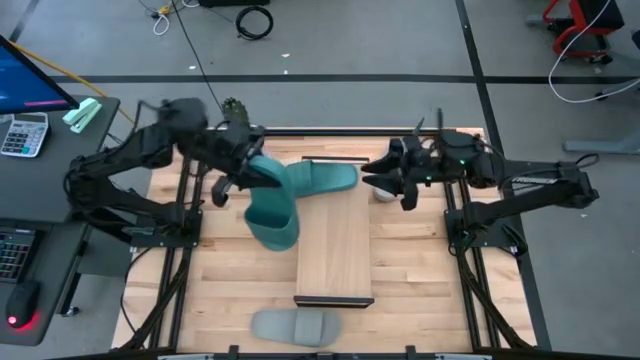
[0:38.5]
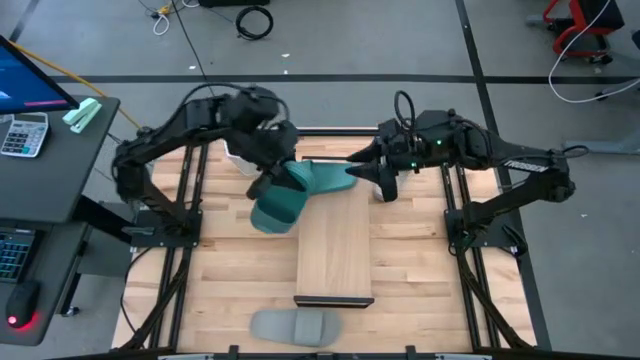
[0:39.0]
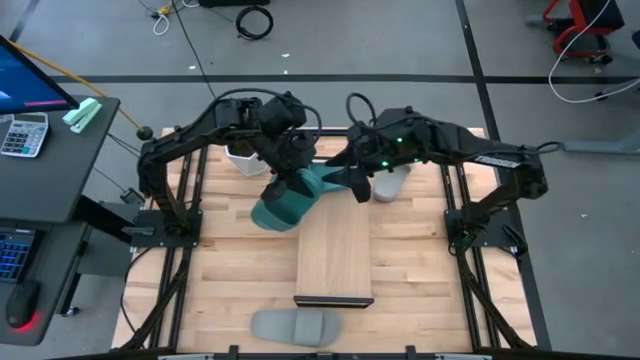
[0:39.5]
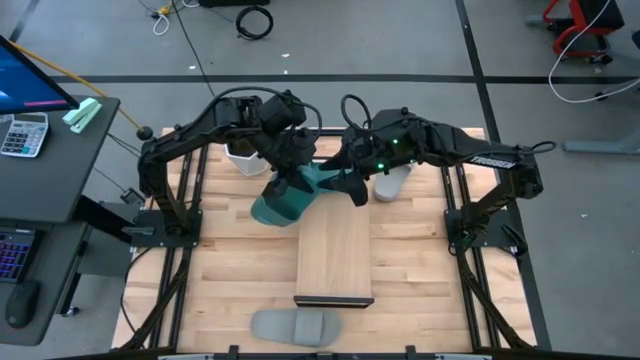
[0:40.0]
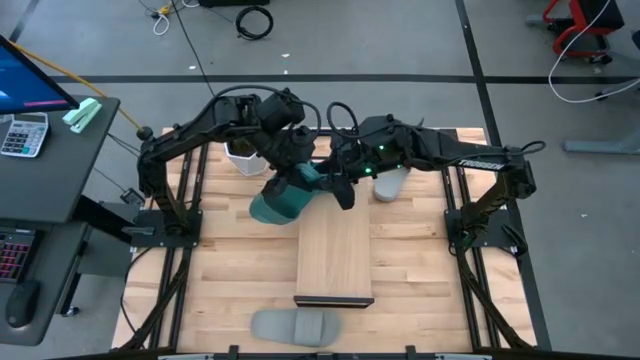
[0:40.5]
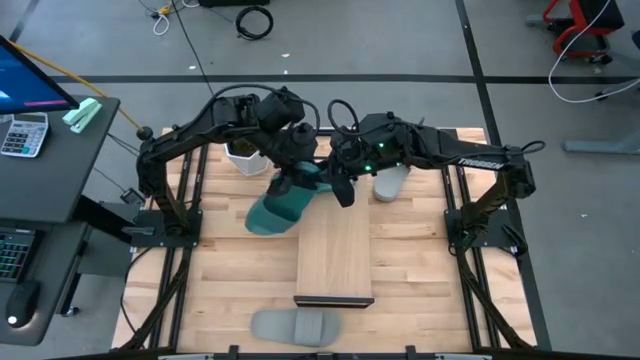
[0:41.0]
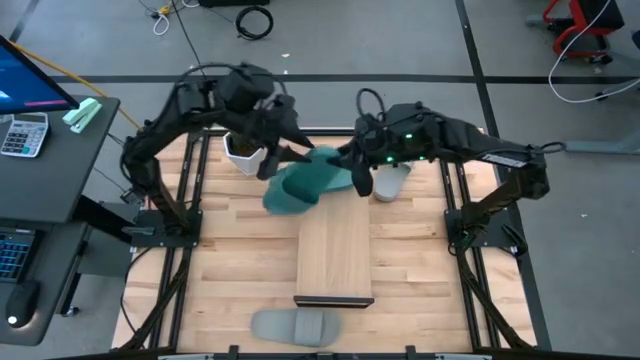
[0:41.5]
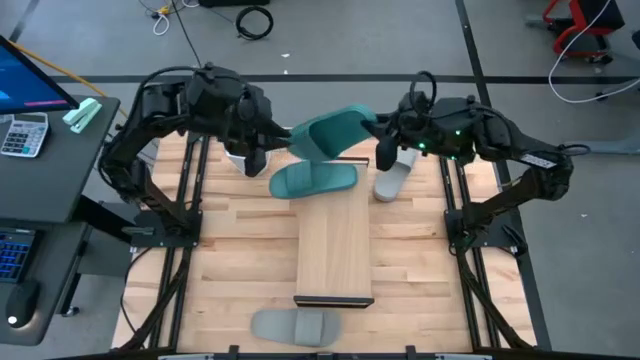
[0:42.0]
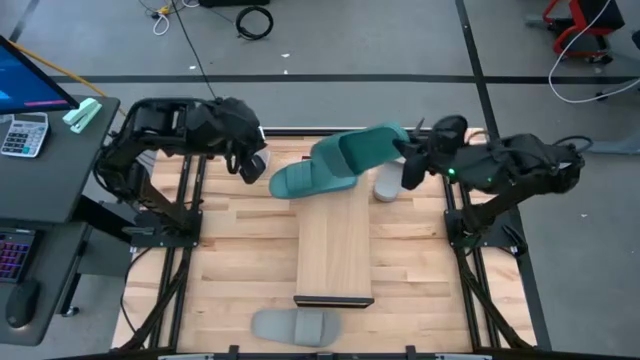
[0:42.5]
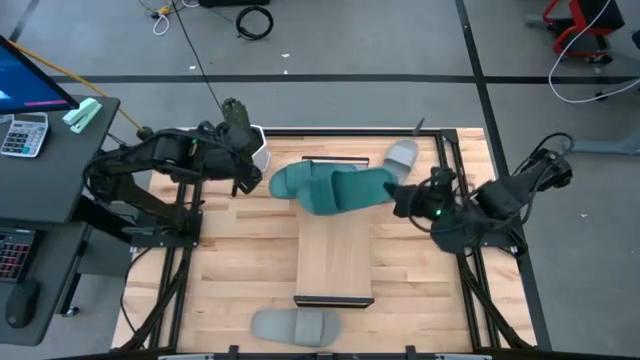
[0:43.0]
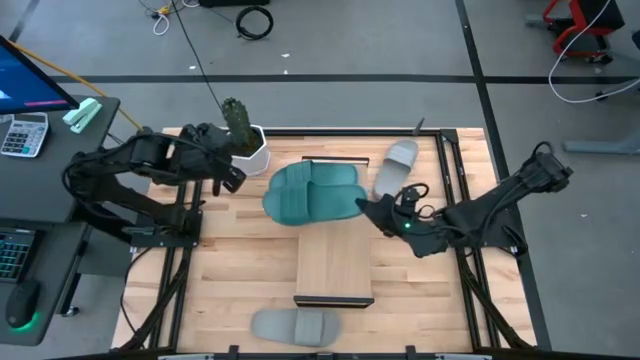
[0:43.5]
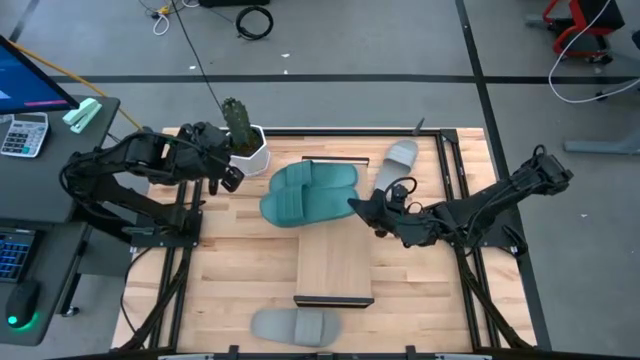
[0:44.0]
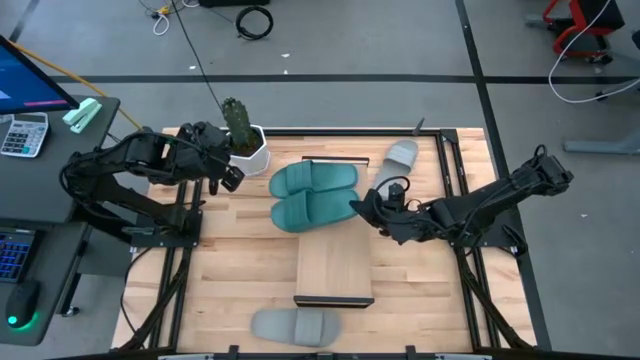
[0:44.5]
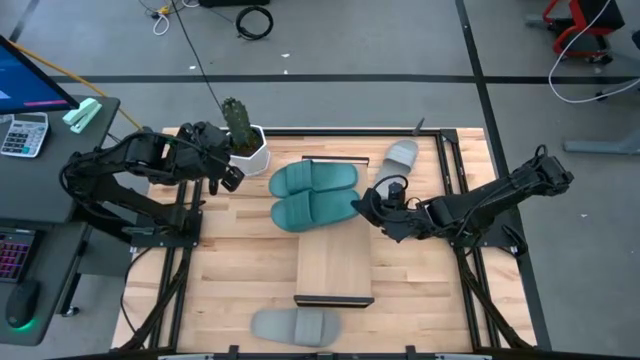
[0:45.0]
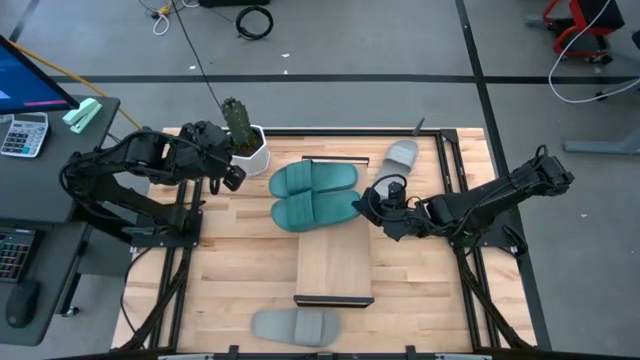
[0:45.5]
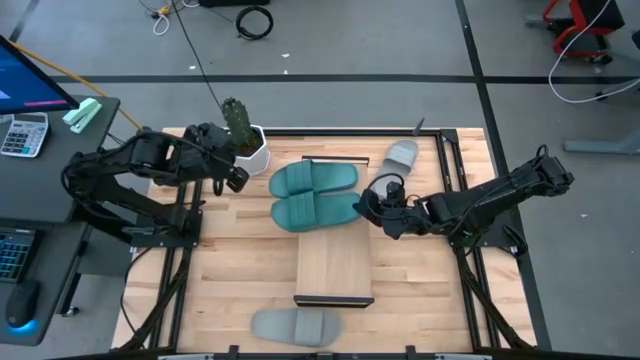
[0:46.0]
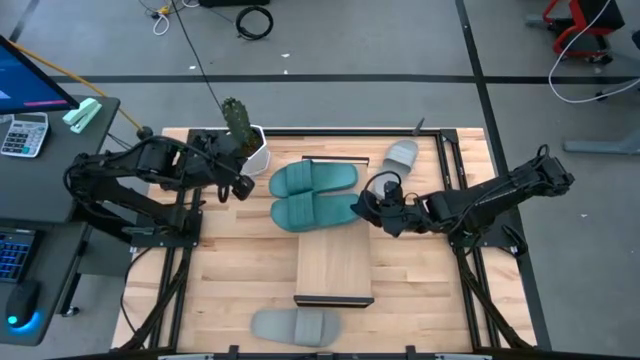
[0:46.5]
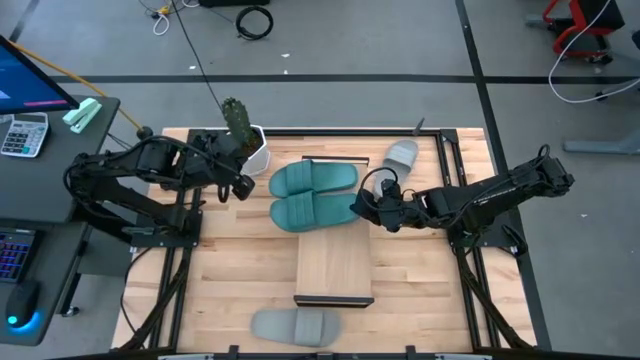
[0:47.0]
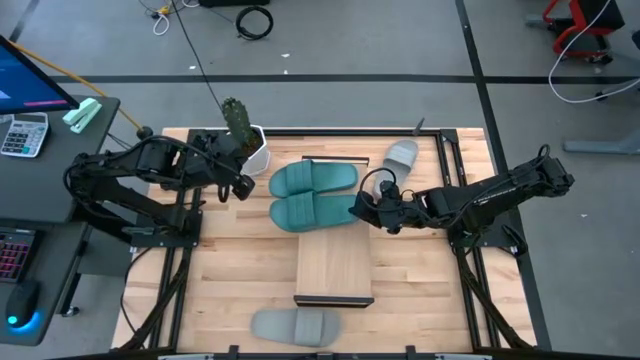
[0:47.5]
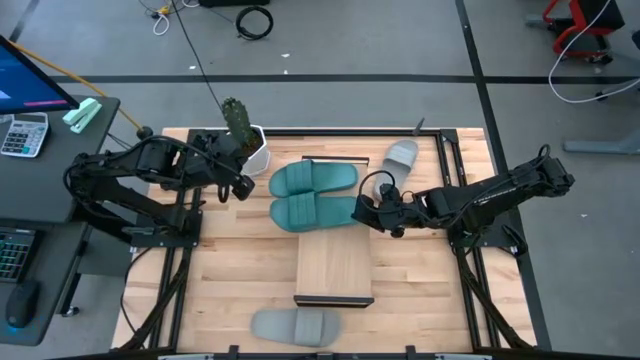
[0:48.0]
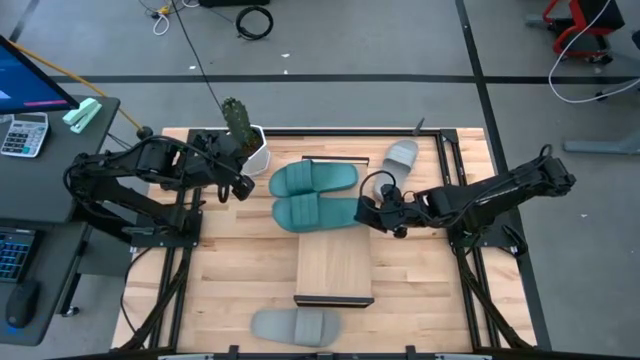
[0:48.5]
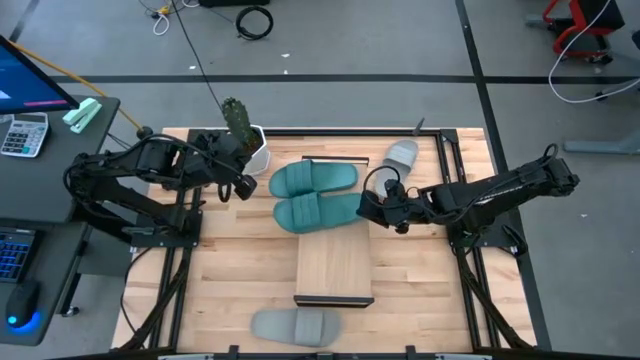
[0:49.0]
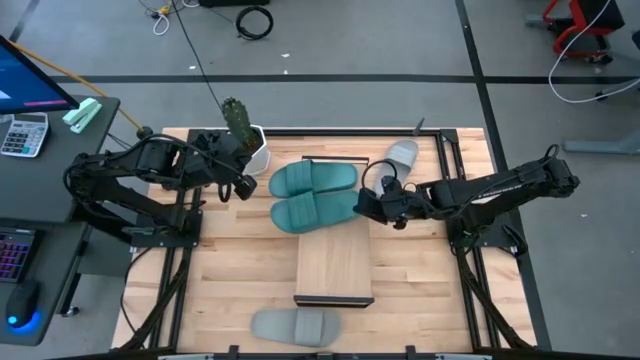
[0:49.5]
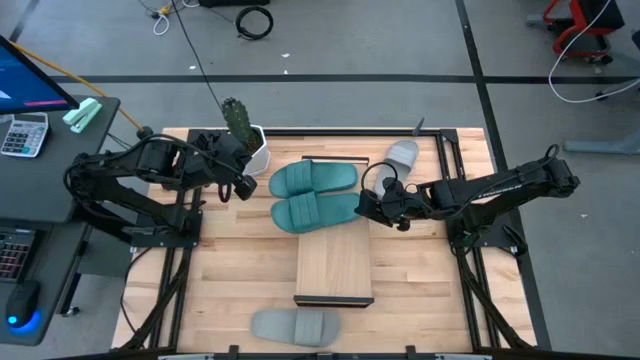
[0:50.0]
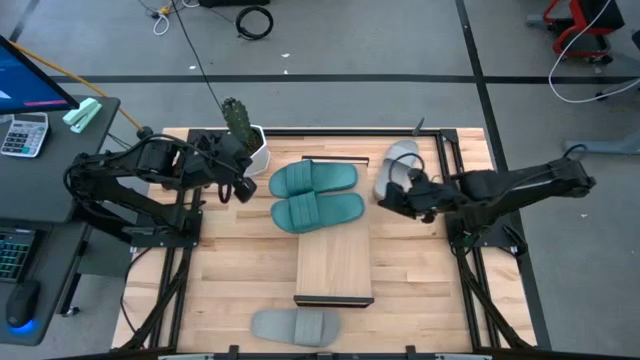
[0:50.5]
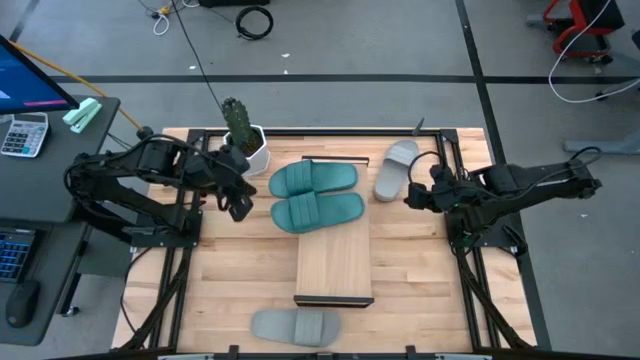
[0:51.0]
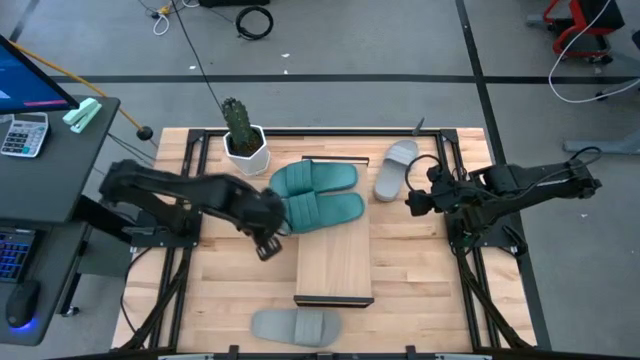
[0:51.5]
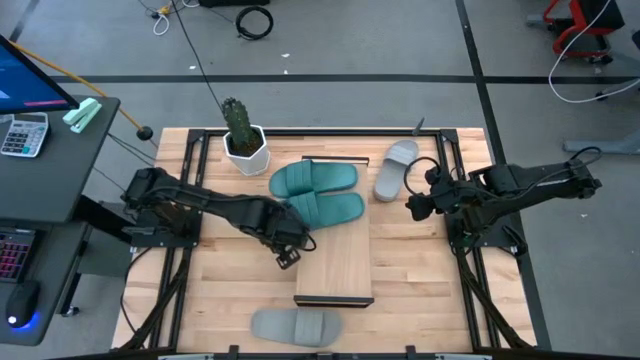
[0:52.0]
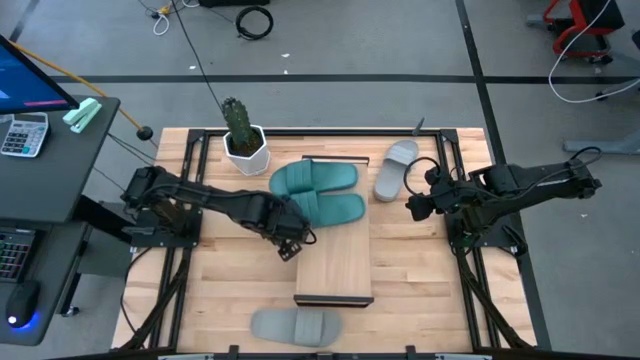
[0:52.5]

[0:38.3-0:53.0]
Task: Pick and place slides into the shelf
Put the green slide on the shelf

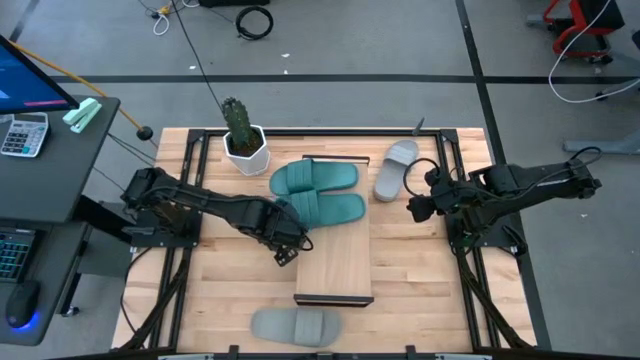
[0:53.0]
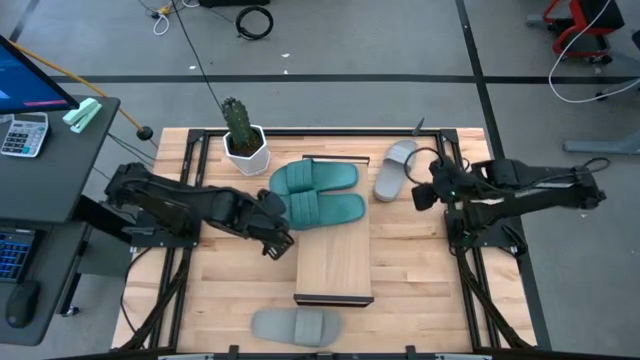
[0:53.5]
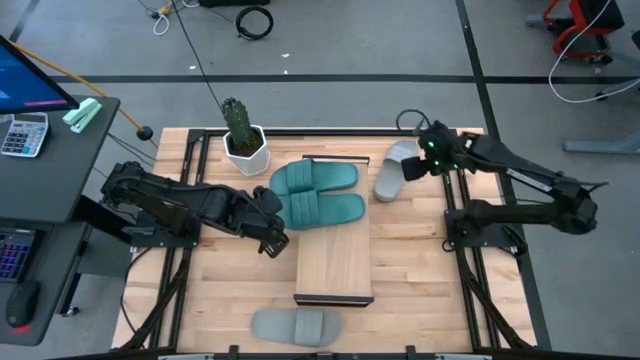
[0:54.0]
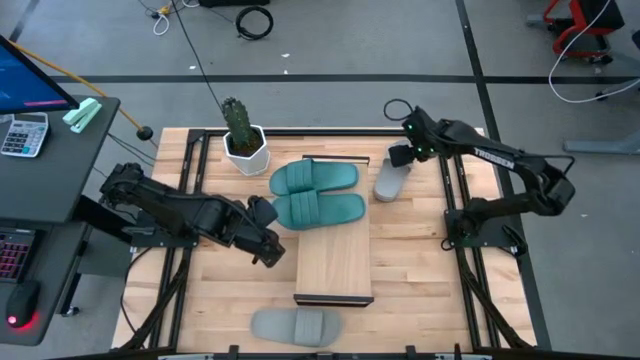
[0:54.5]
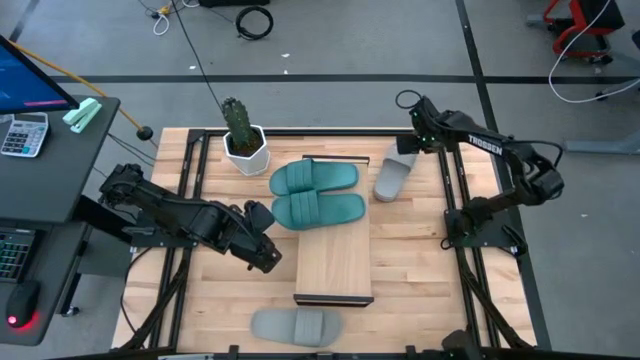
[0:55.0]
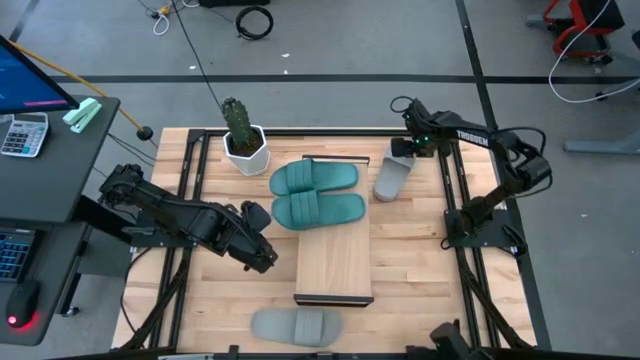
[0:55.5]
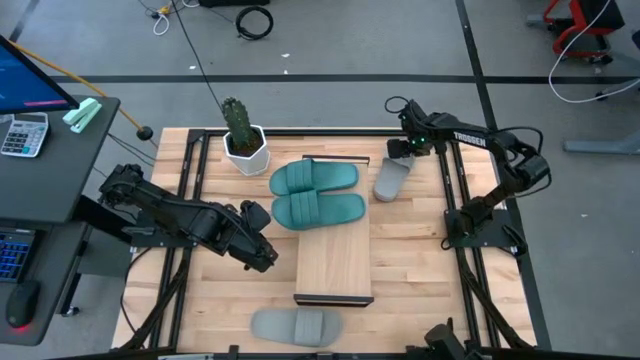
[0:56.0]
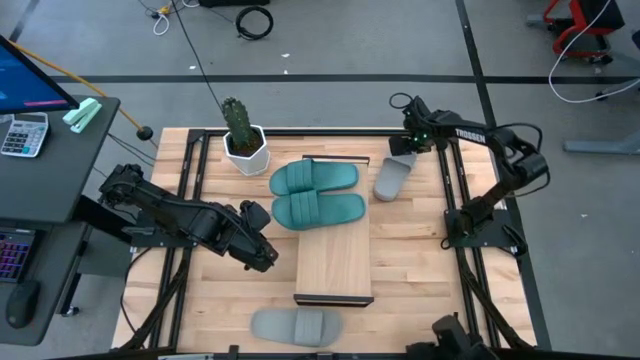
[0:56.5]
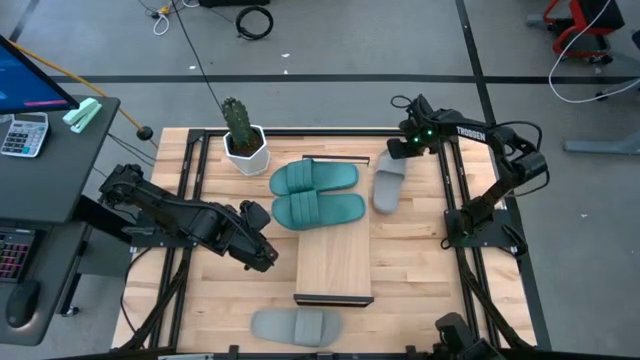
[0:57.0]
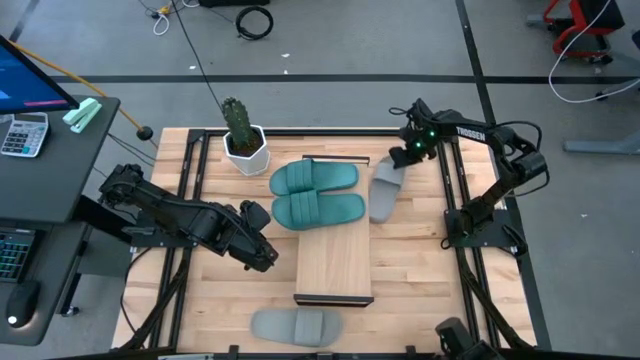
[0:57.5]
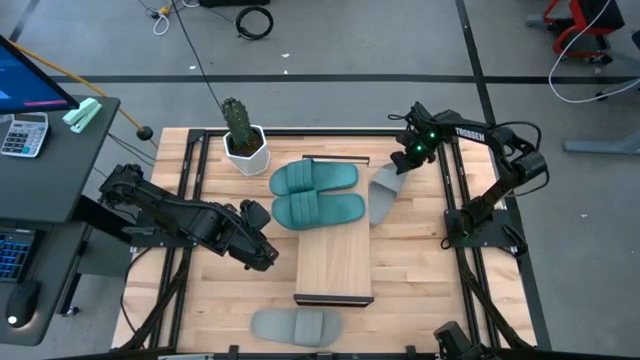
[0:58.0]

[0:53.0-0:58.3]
Put the top gray slide on the shelf
